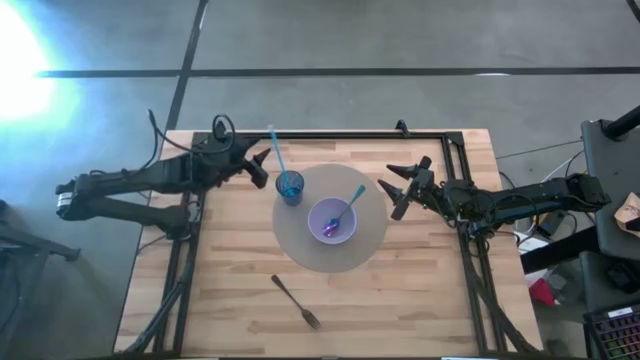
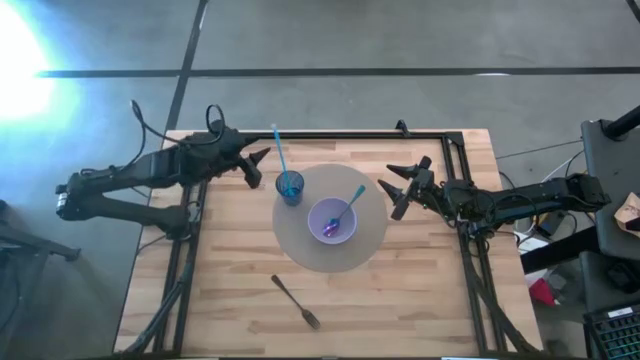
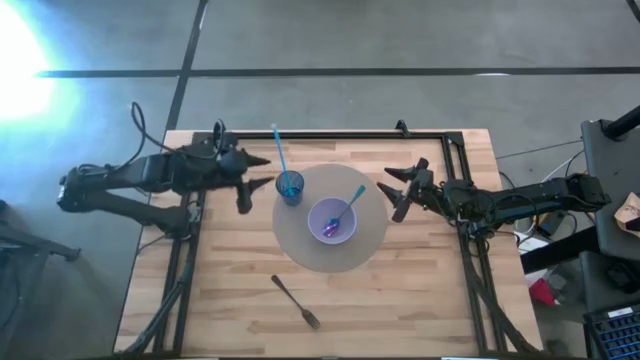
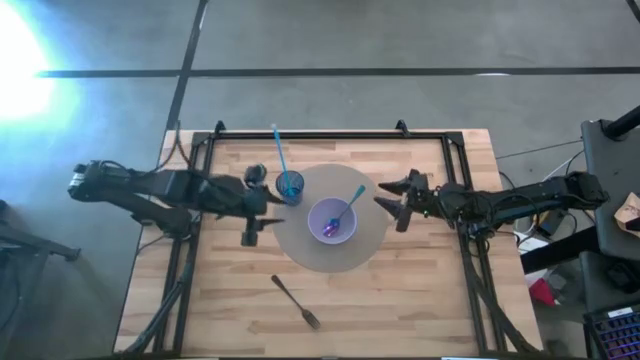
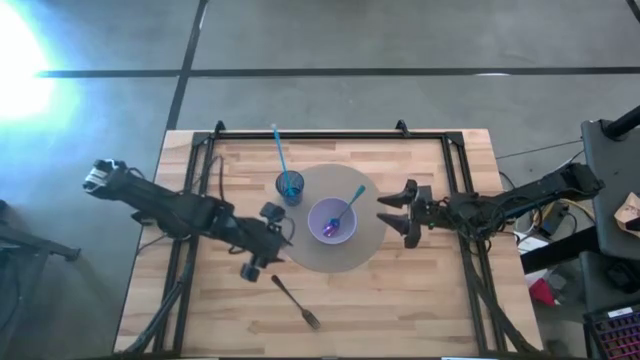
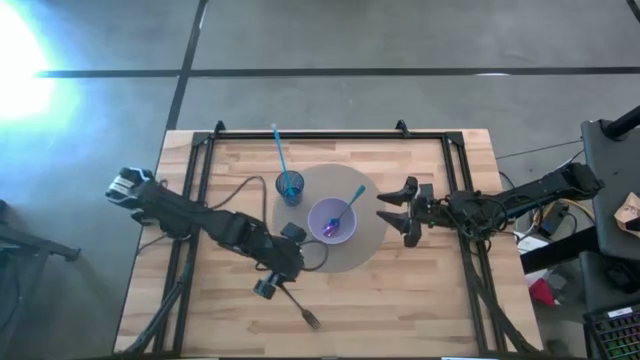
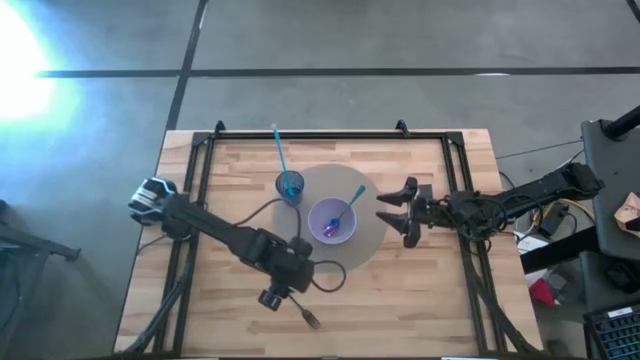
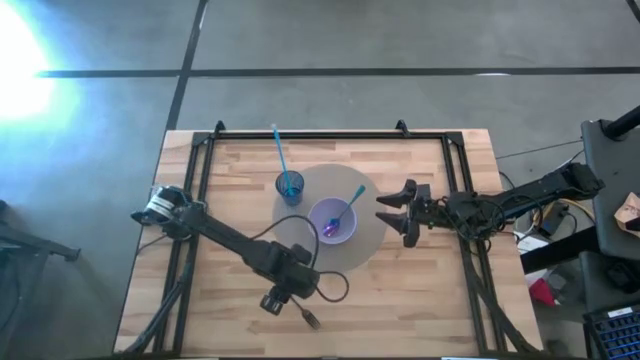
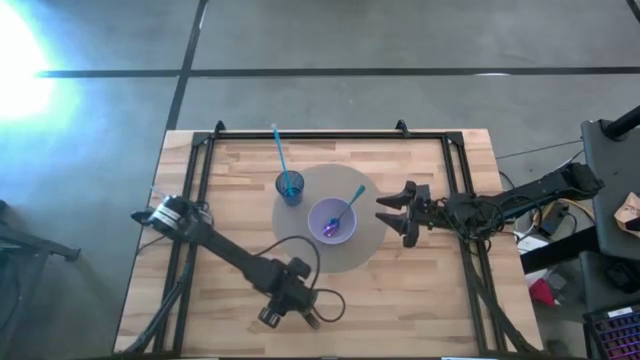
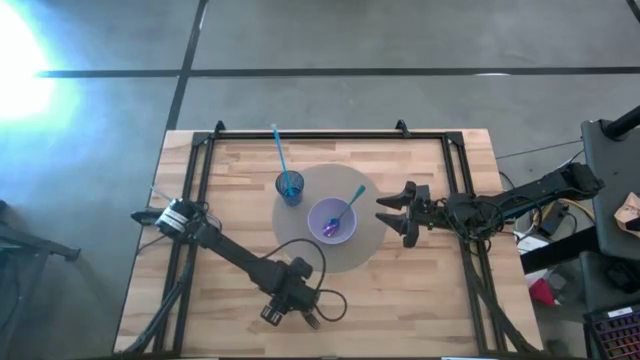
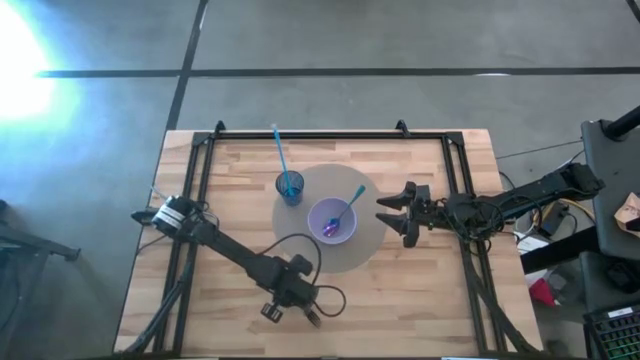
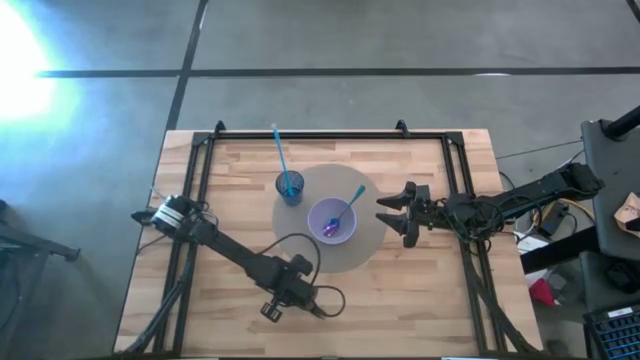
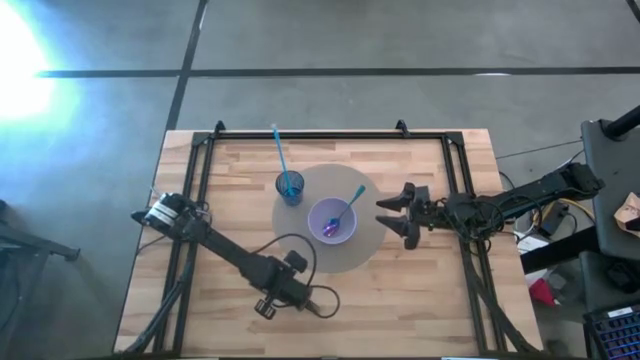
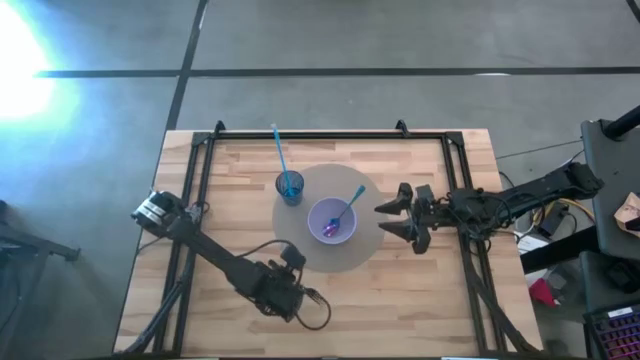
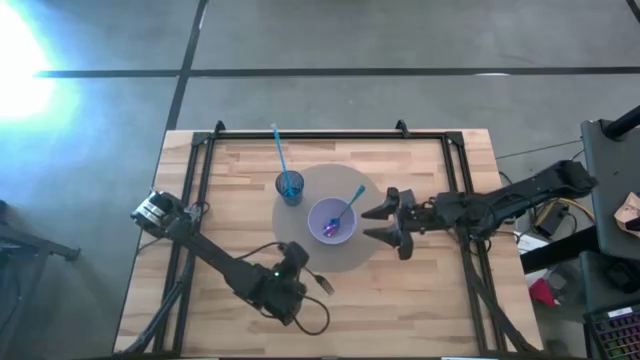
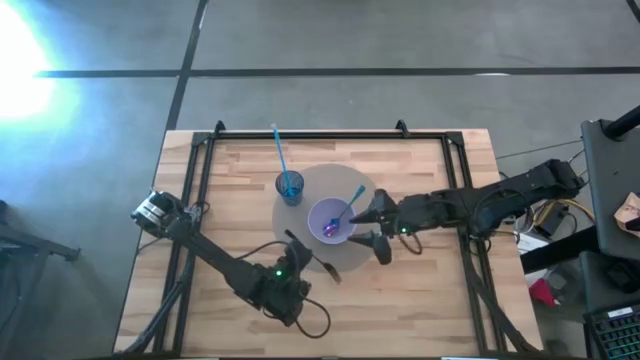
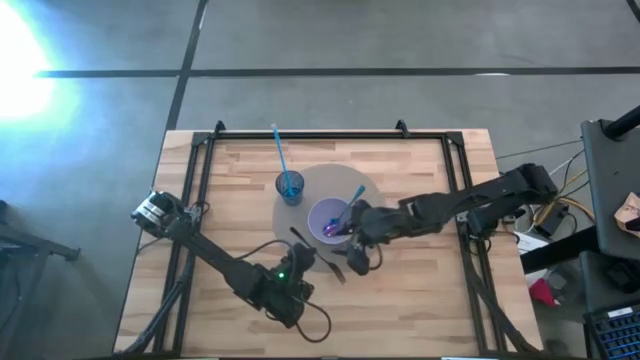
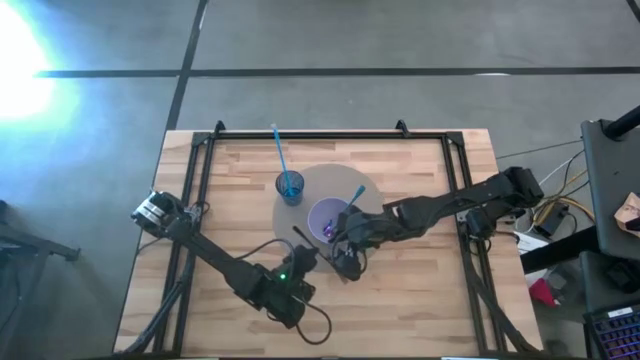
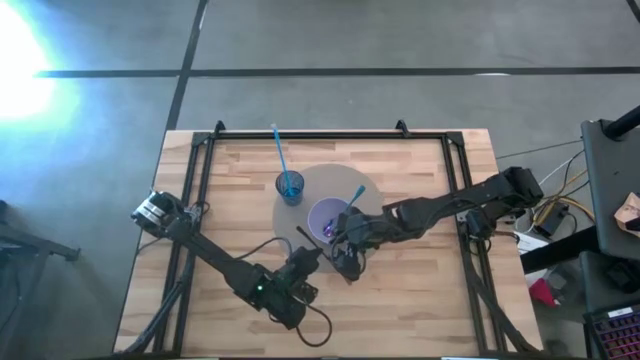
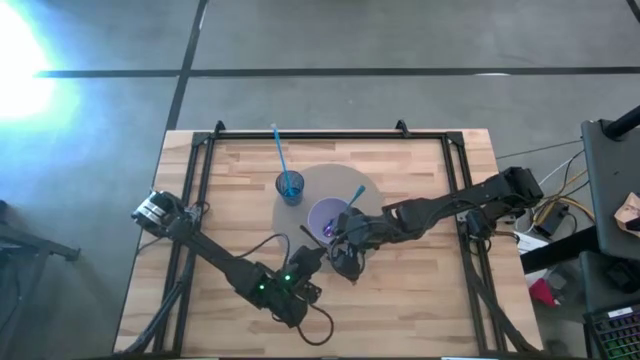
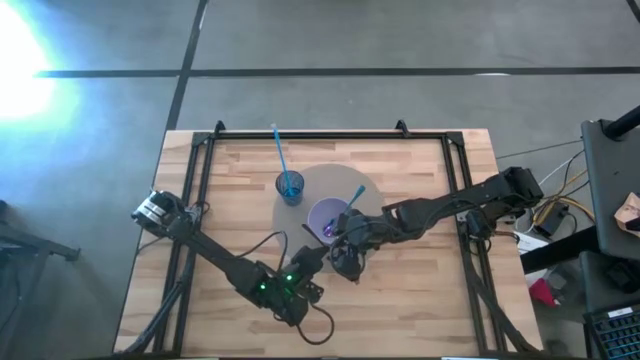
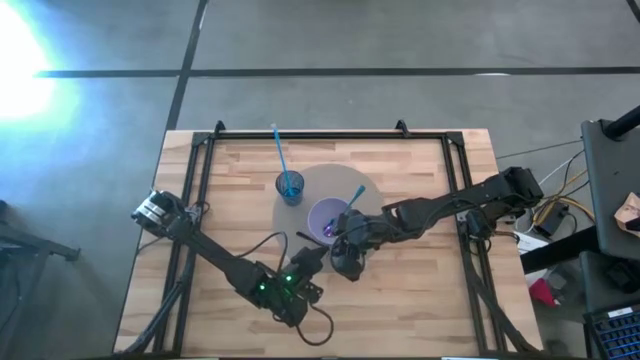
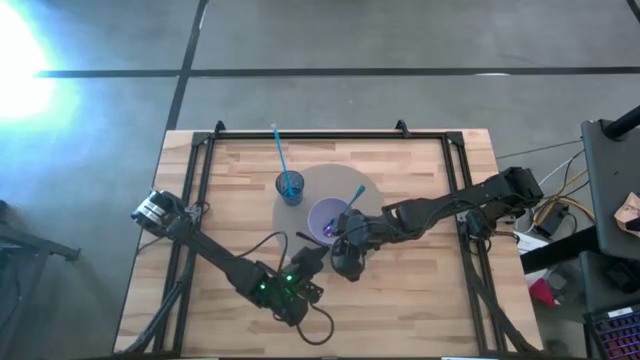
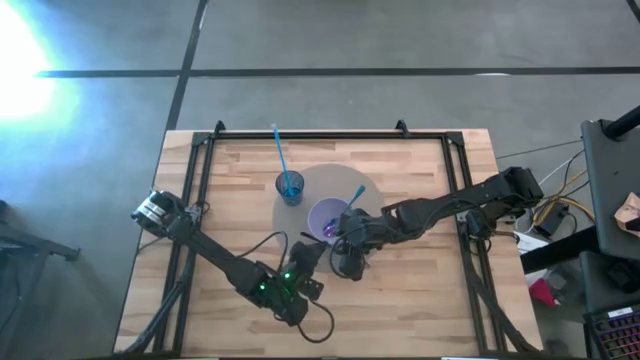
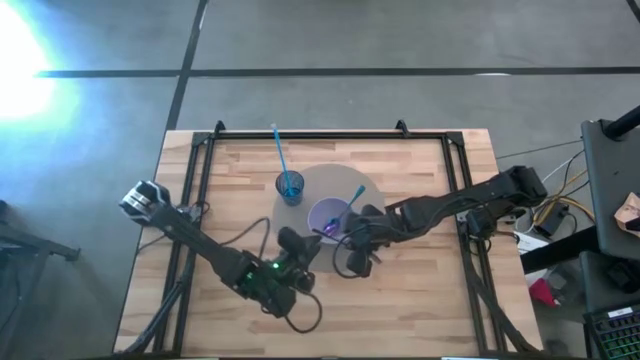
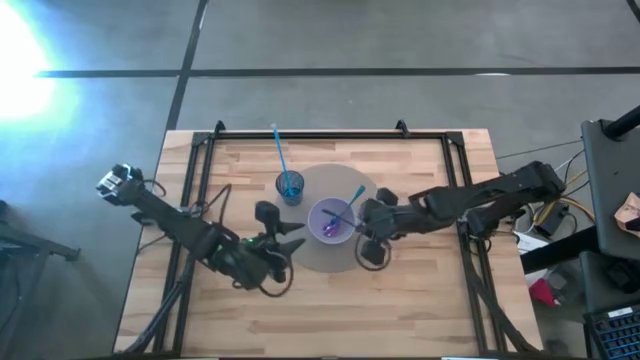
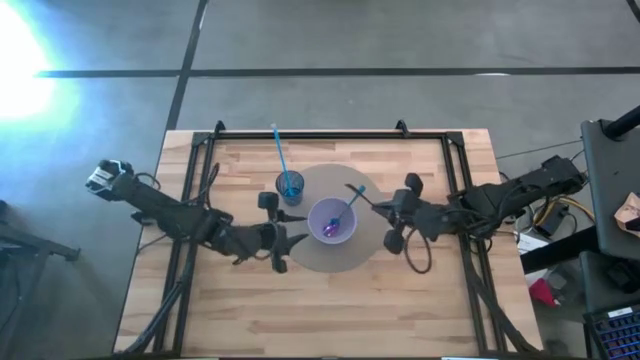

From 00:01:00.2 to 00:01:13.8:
Task: Pick & Place Utensil
Put the black fork into the purple bowl

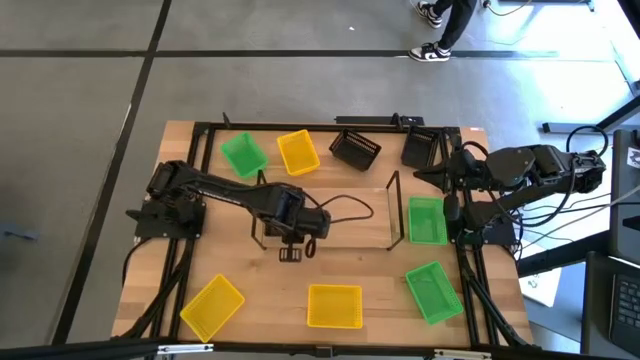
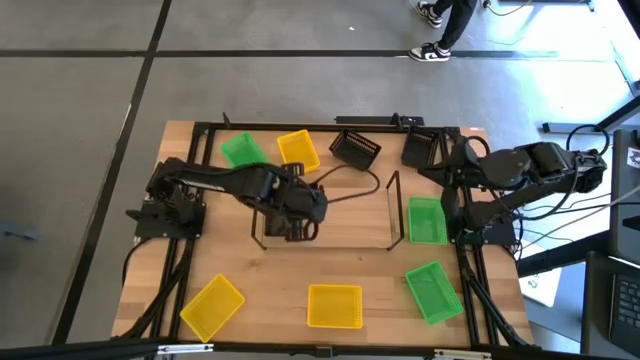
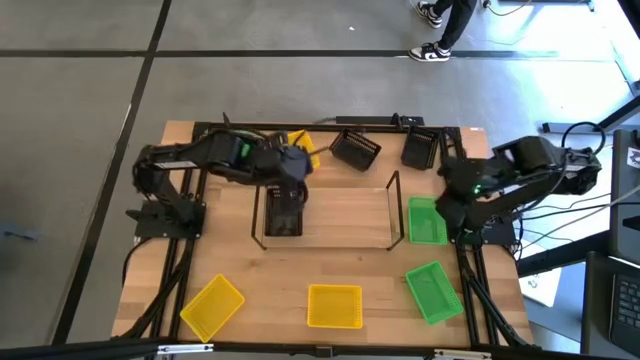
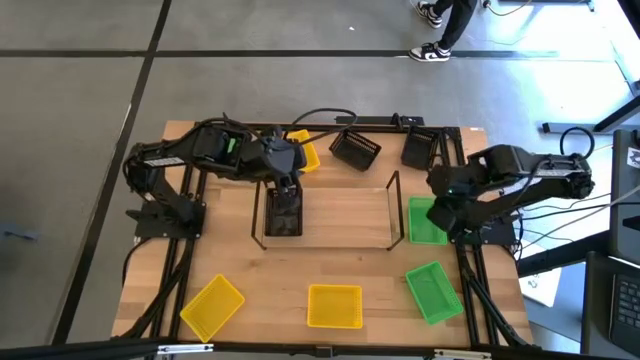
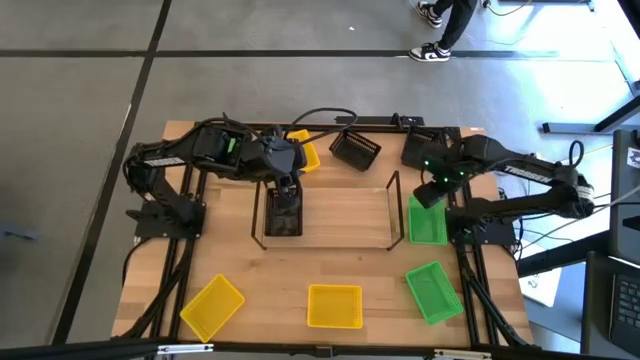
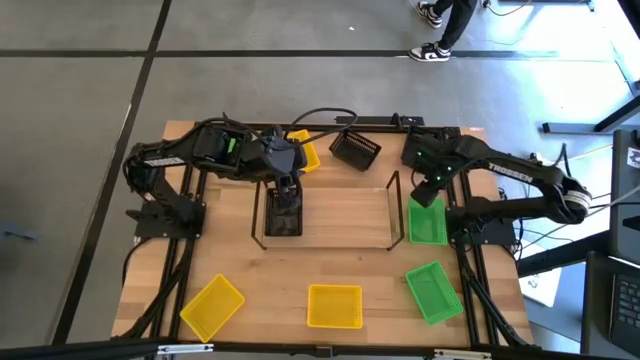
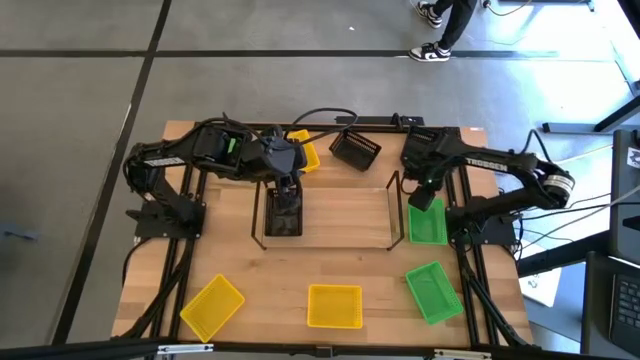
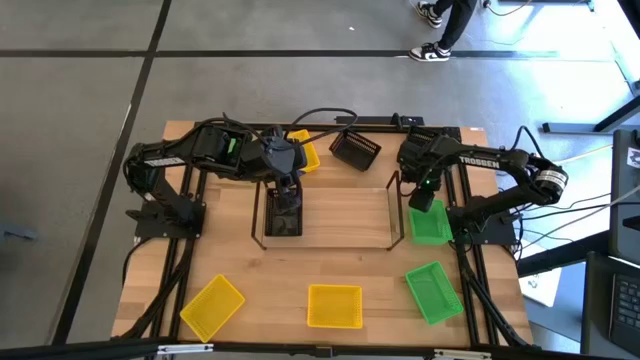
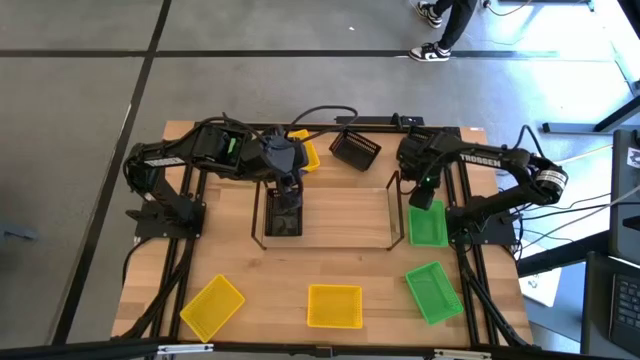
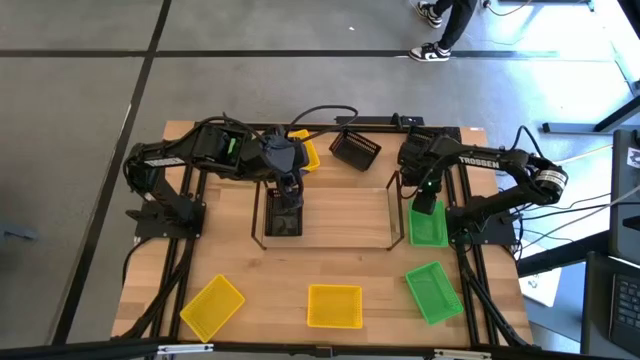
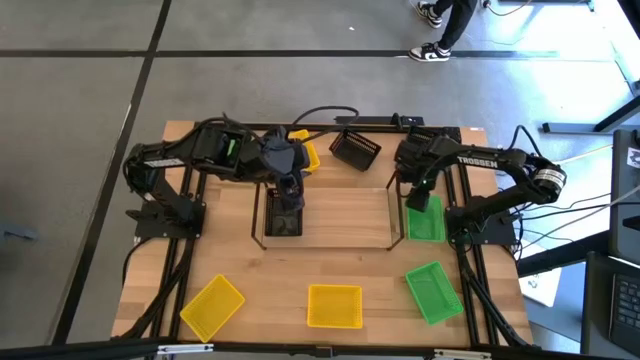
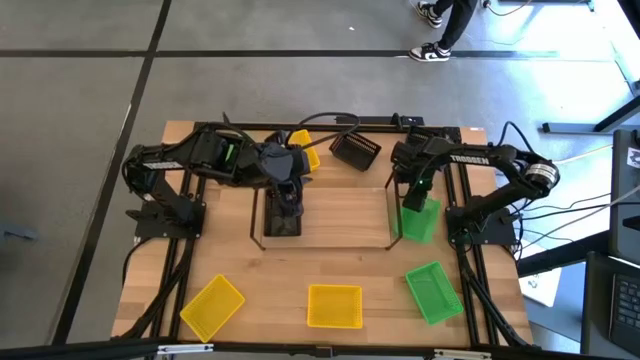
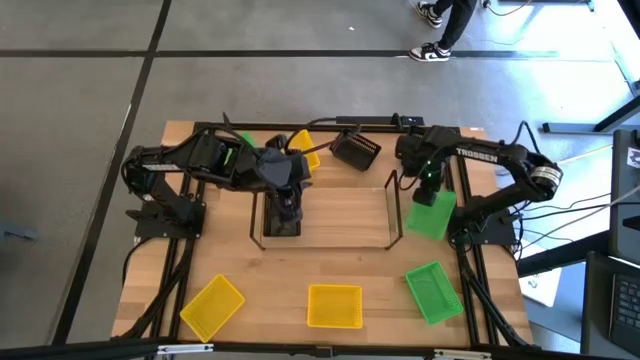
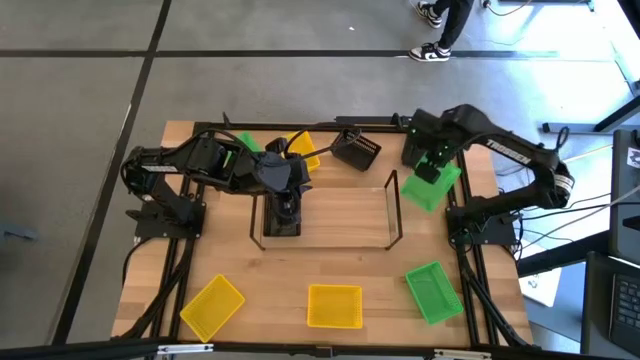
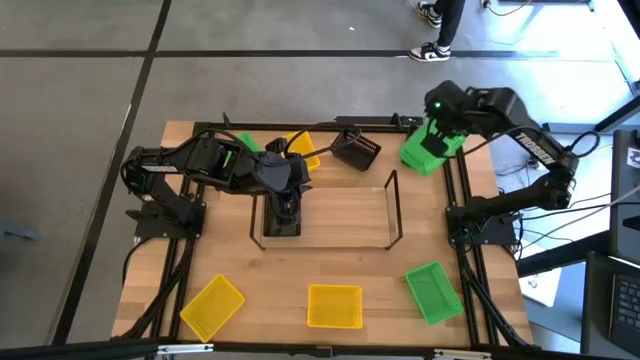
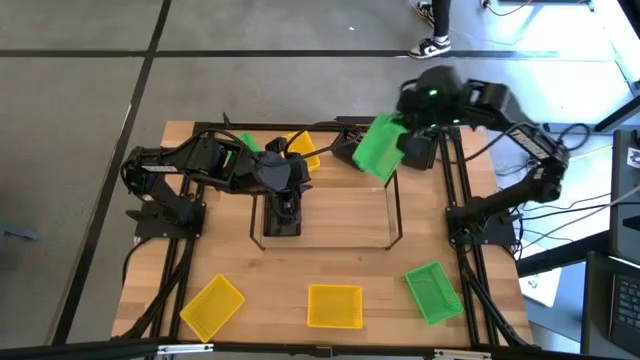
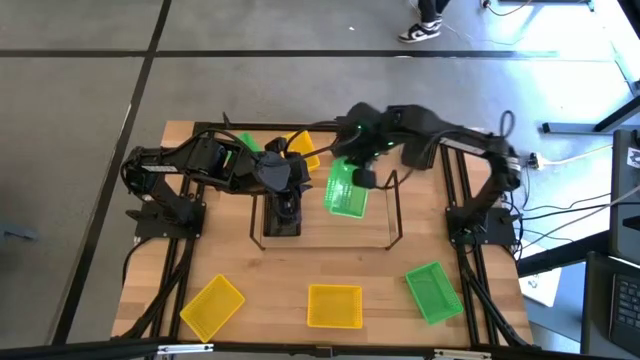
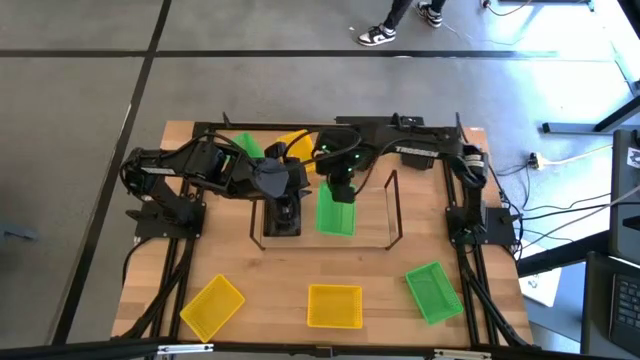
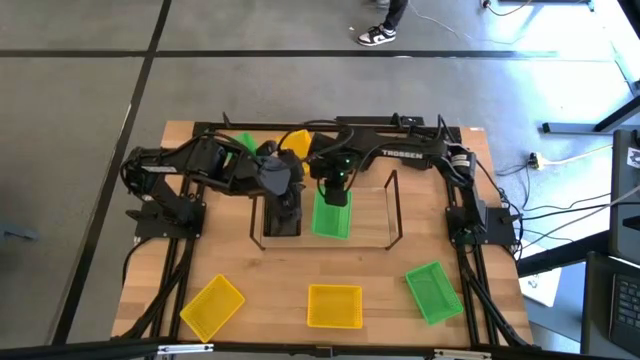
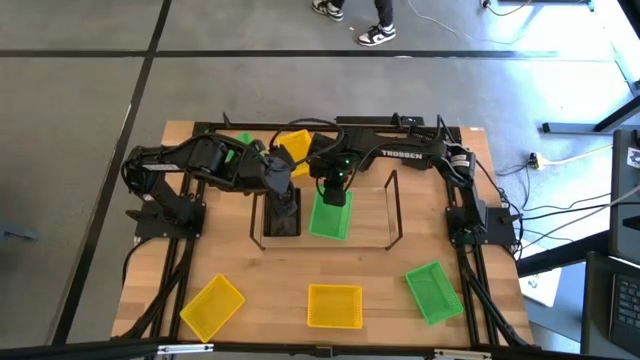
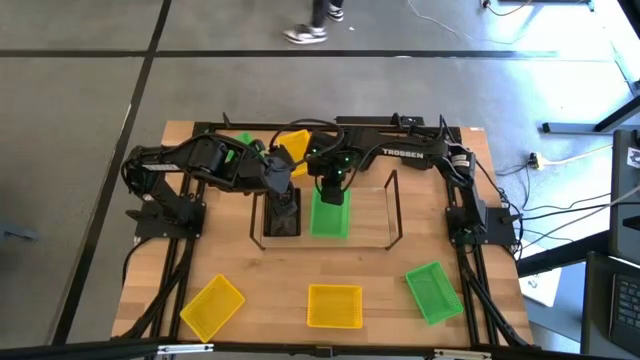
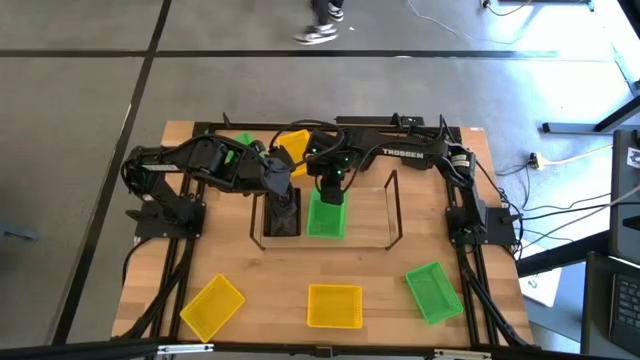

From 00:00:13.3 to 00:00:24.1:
Task: Stack baskets on shelf by color
Put the top right green bin on the shelf
